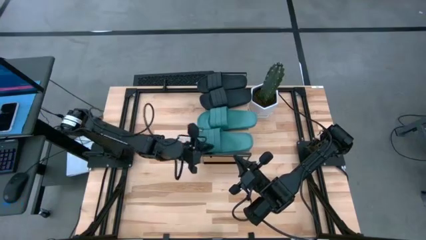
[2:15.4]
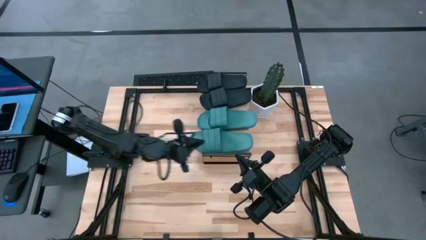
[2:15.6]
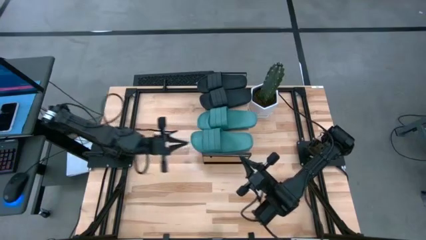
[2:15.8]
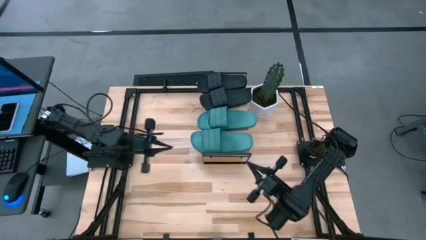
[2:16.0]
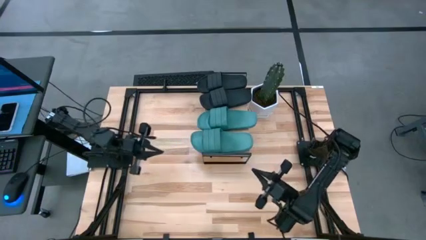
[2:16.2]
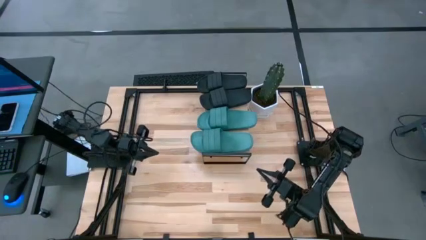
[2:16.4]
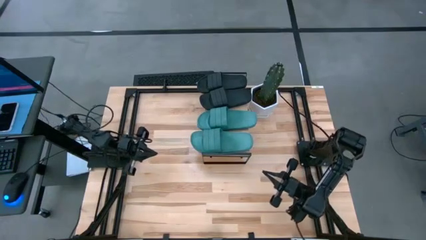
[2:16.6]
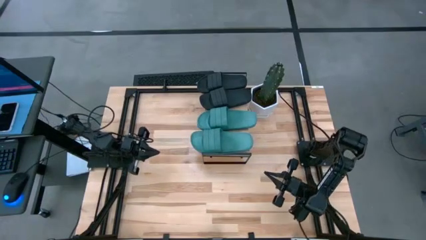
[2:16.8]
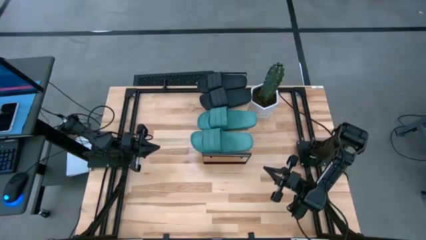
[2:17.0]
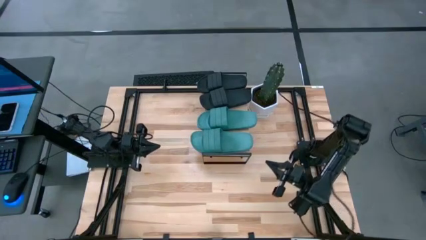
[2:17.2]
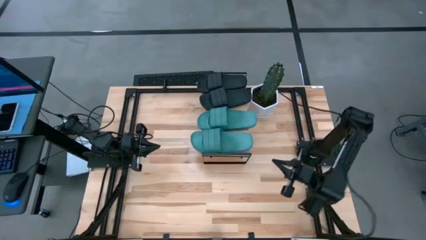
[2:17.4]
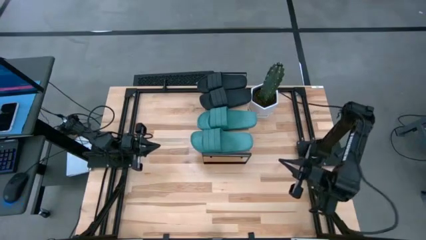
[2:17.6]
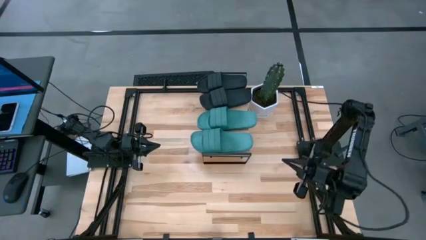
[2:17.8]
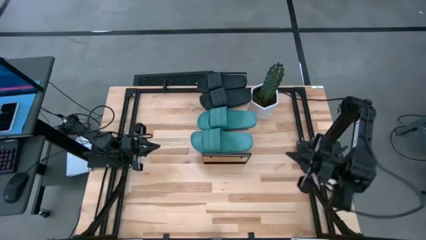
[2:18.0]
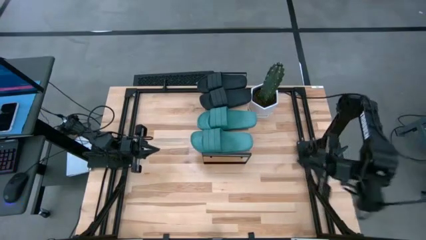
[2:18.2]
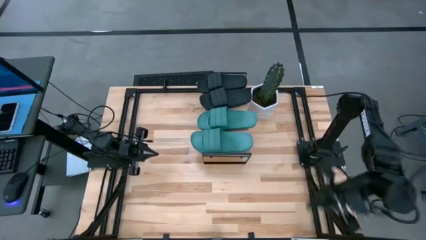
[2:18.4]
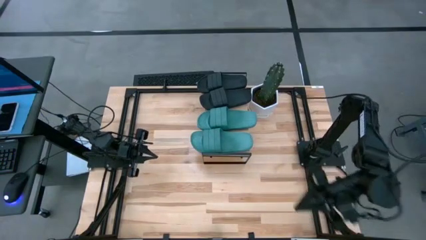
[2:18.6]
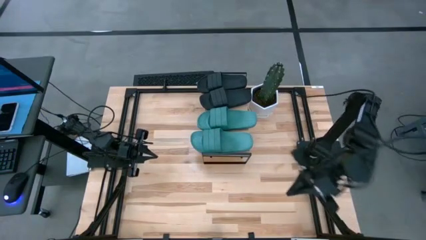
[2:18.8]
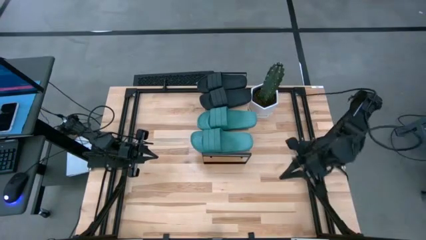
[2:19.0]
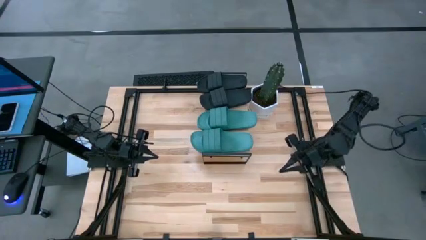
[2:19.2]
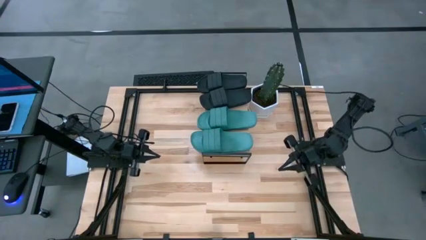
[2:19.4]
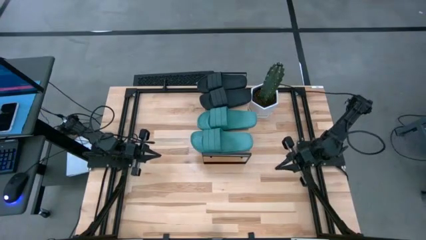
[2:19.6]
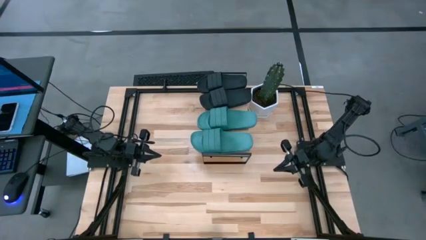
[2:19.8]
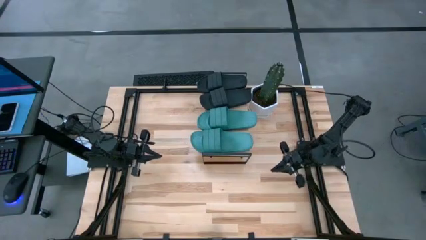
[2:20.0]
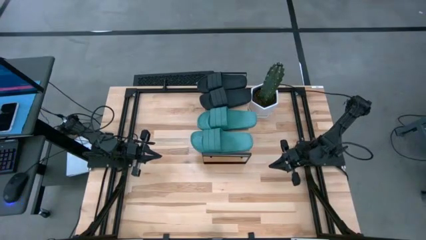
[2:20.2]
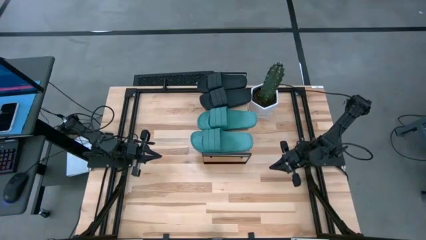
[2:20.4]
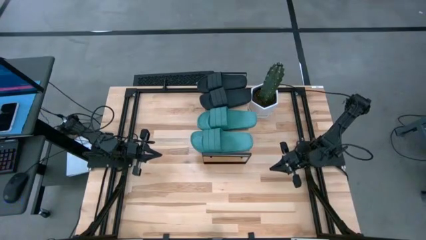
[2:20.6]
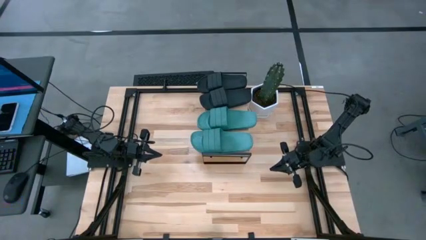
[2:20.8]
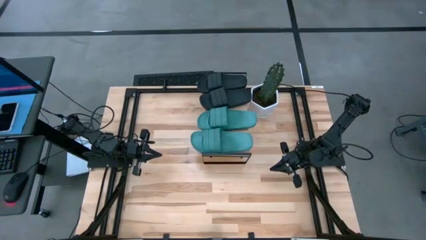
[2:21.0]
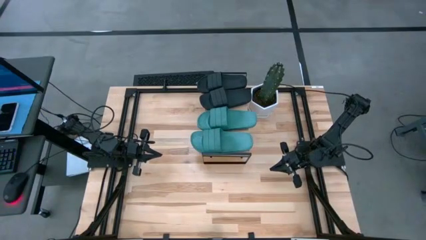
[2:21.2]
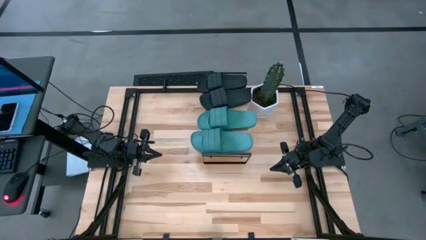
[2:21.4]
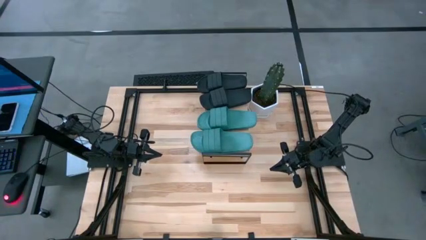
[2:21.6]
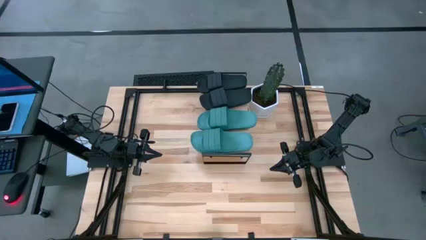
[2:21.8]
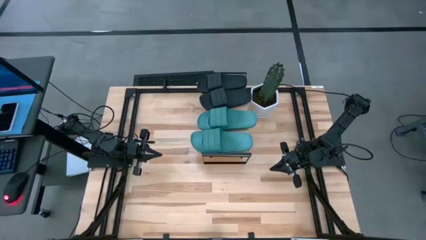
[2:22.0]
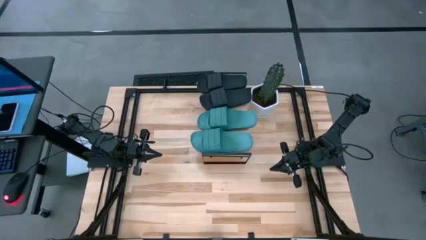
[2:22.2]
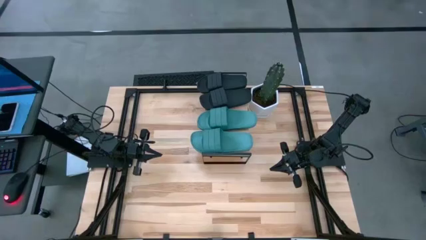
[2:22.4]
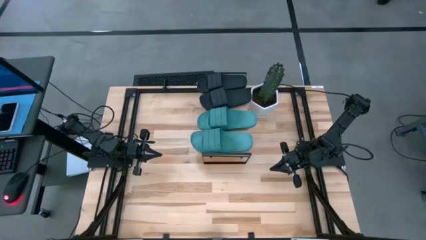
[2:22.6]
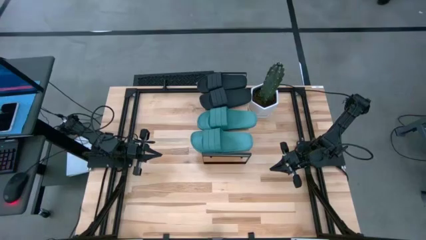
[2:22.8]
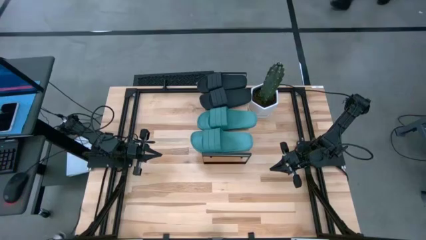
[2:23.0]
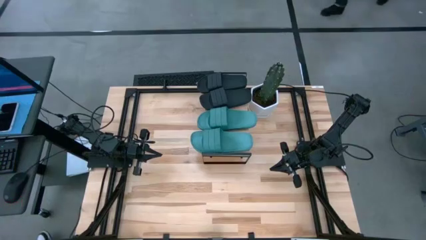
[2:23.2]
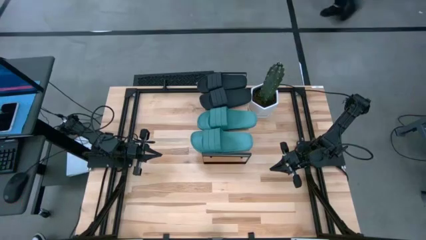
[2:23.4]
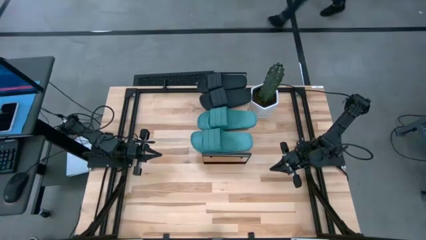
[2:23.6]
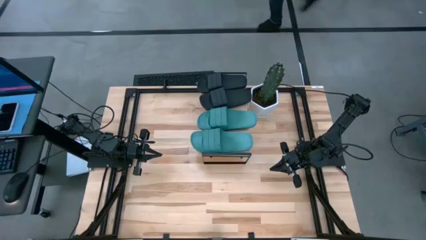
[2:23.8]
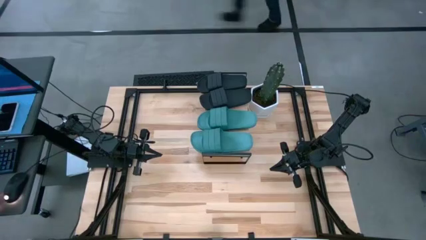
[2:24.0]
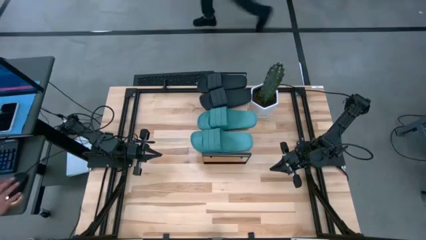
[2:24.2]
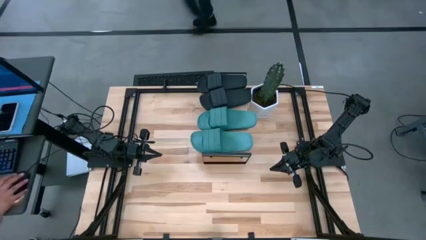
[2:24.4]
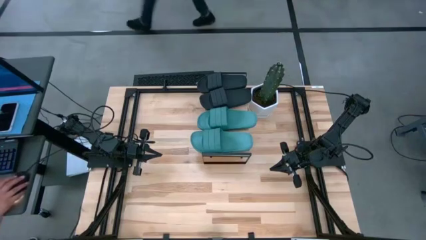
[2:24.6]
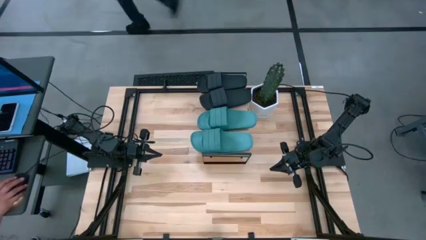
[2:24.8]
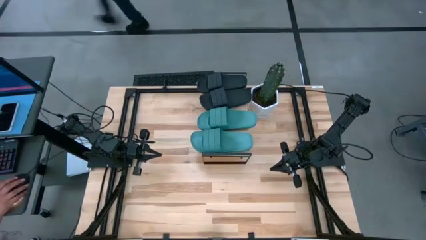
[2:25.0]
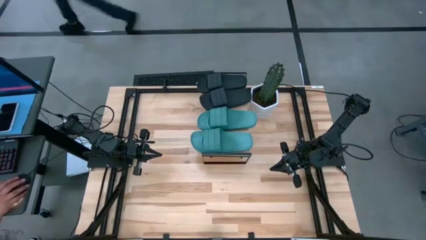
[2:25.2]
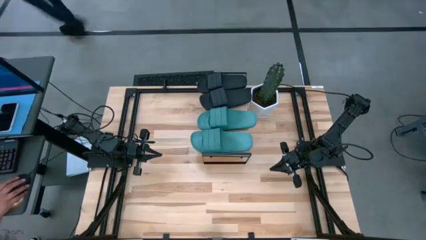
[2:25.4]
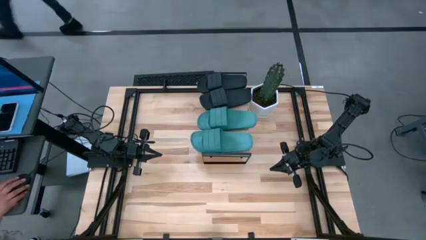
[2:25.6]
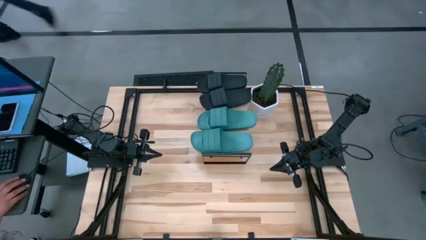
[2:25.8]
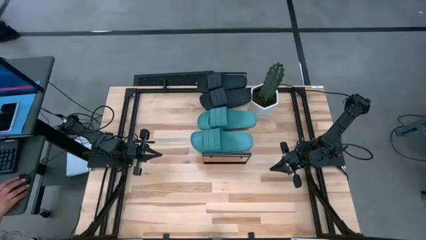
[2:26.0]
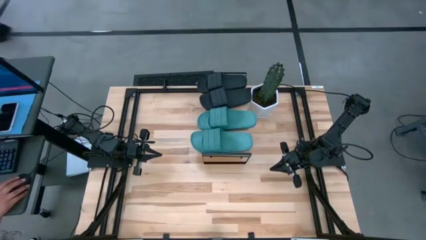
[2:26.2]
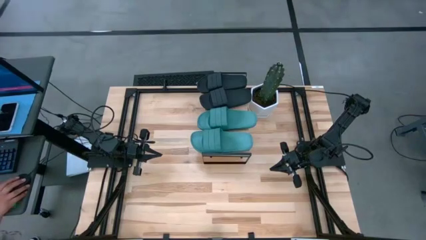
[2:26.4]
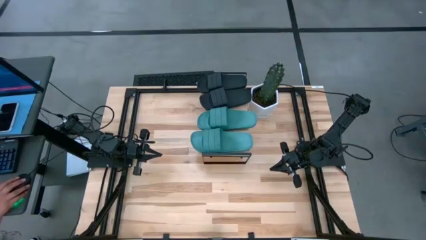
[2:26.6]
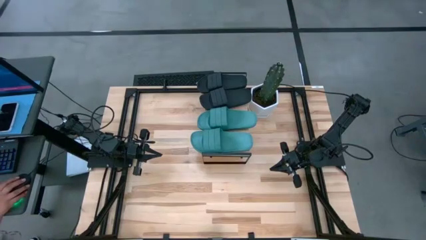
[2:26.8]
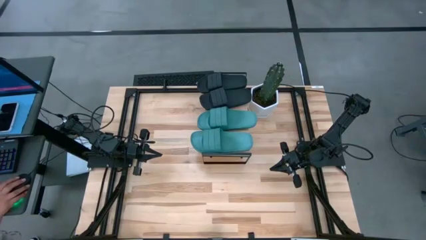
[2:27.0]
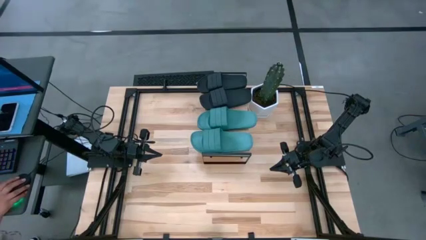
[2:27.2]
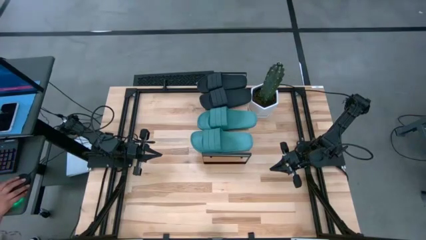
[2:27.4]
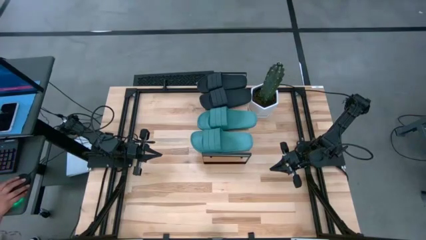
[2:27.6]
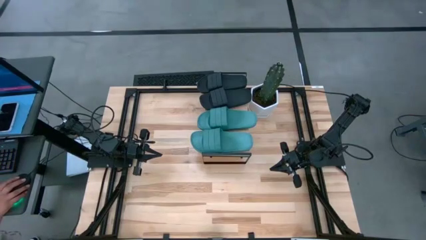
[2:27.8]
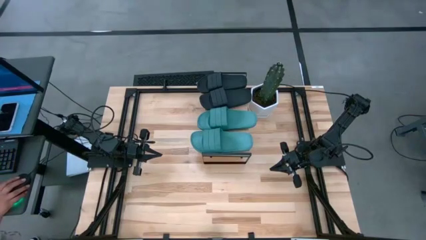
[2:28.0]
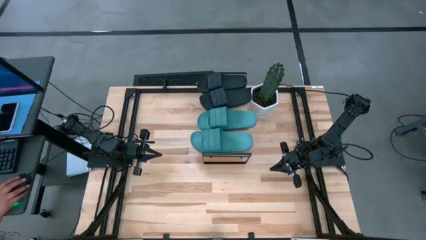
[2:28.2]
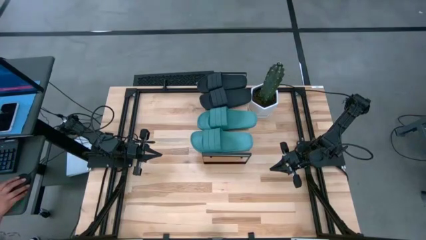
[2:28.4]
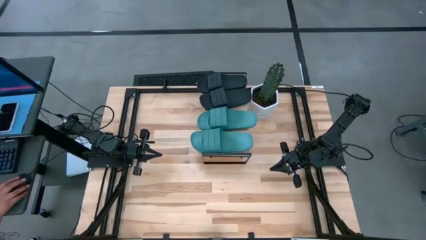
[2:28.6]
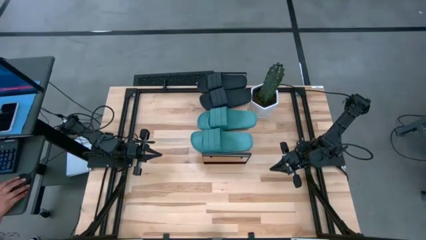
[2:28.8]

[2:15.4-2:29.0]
Task: Pick and place slides into the shelf
Return to Home Position

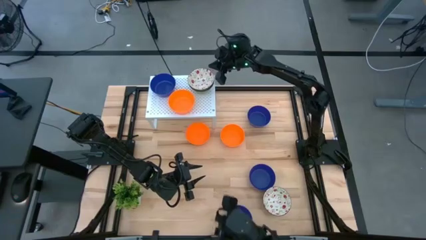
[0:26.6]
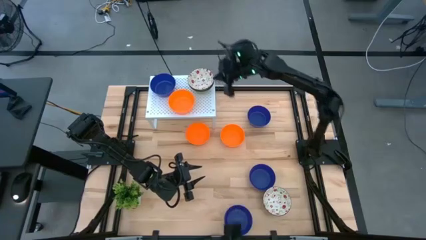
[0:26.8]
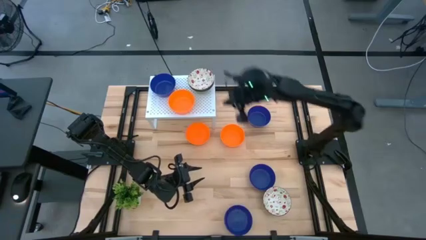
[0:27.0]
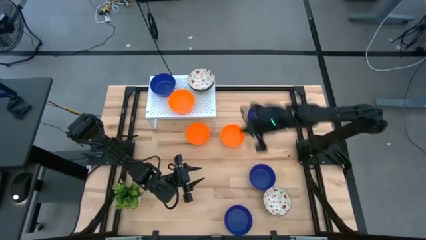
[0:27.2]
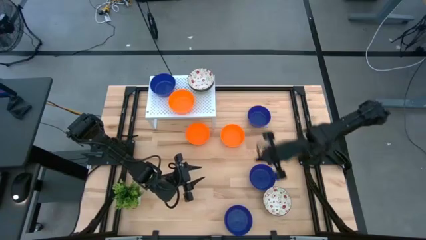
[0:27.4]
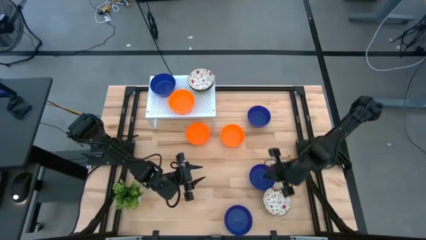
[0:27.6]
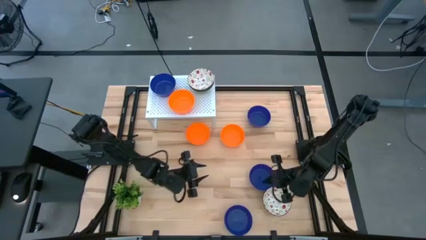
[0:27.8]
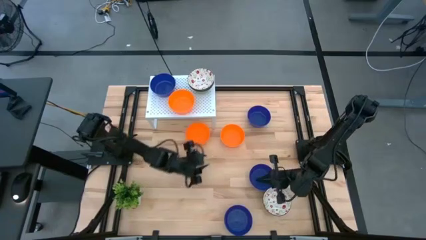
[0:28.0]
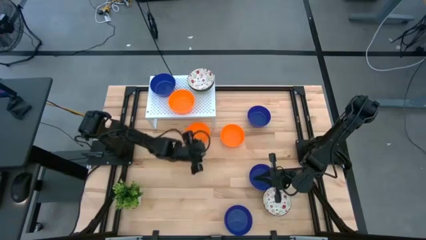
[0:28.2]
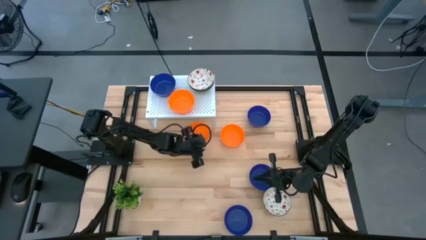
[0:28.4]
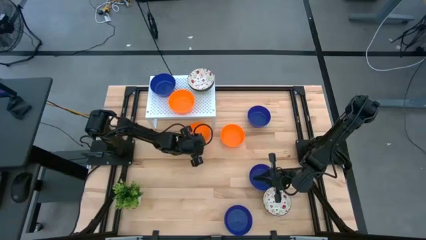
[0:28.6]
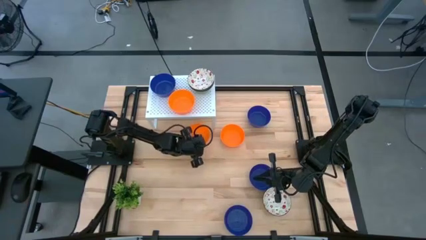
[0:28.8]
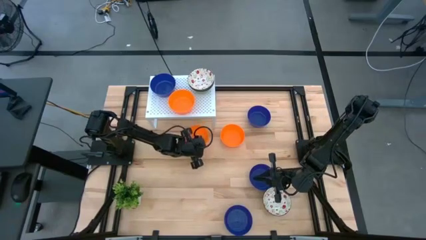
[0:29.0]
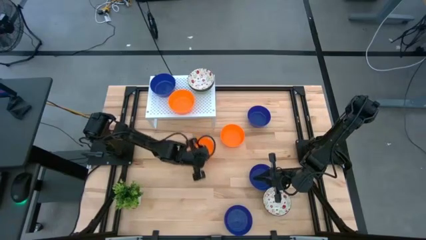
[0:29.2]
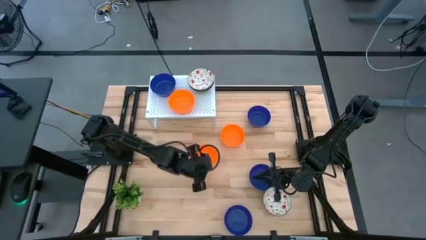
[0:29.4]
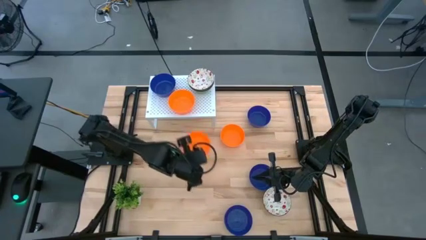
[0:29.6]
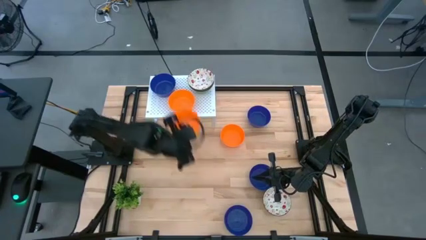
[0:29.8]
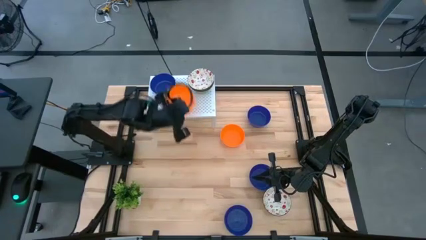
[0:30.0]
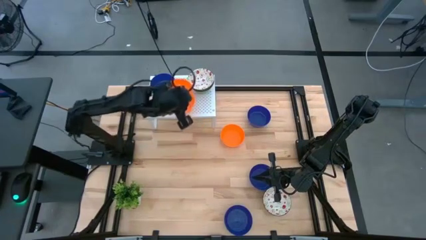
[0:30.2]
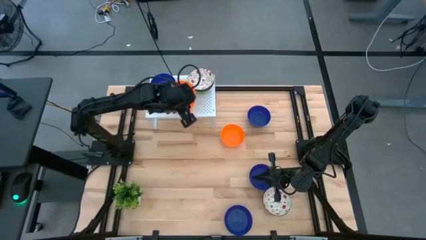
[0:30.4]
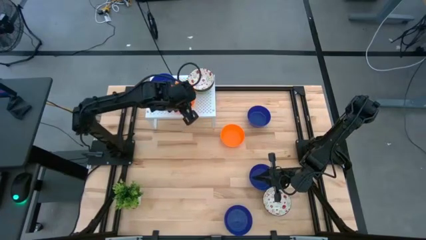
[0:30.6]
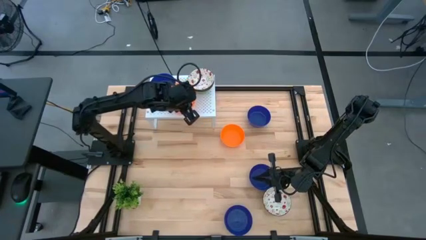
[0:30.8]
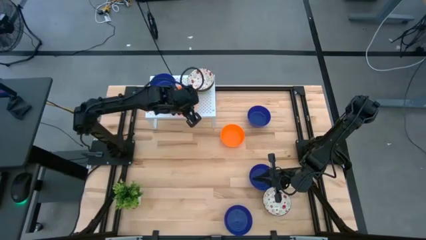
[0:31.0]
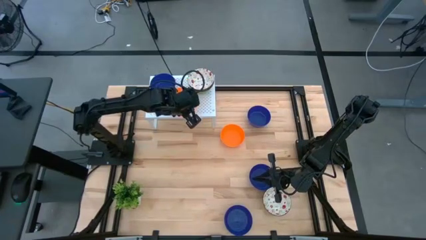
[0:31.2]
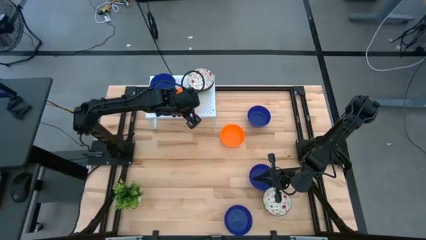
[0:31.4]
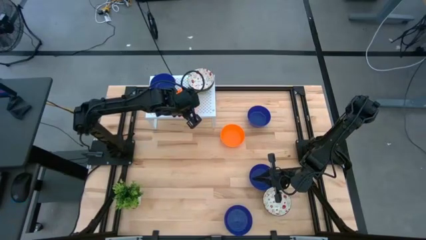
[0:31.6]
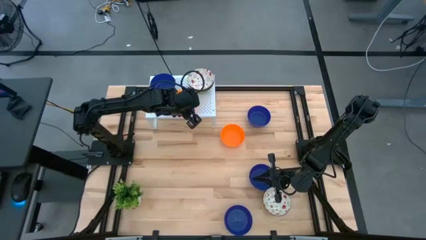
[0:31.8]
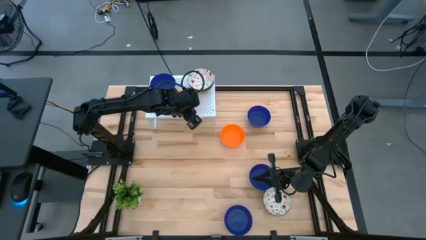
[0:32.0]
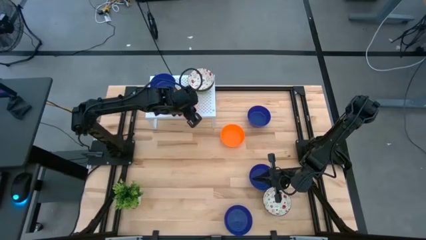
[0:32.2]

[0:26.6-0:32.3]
Task: Pick & Place Mini bowls
Stack the left orange bowl on top of the orange bowl on the shelf
